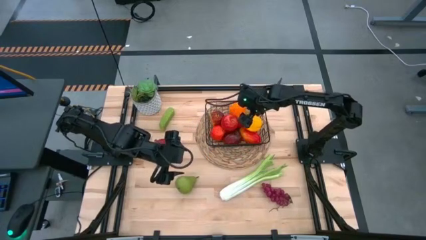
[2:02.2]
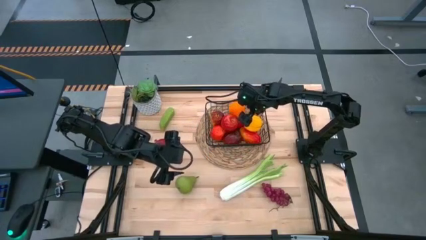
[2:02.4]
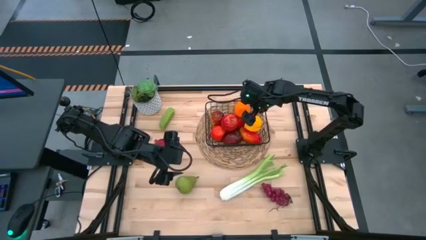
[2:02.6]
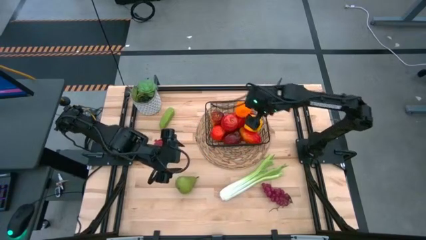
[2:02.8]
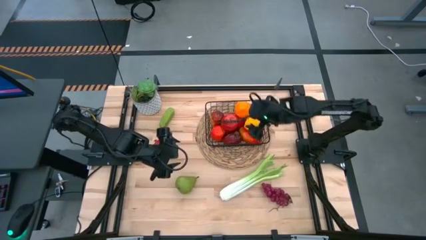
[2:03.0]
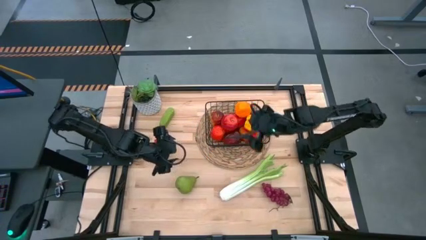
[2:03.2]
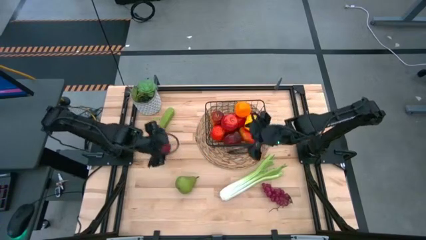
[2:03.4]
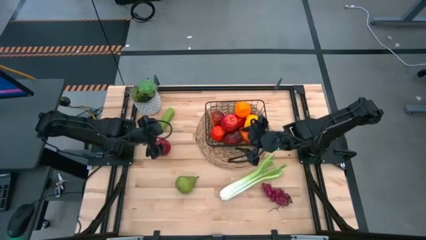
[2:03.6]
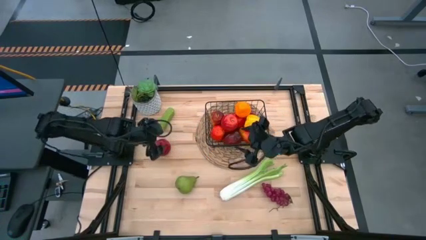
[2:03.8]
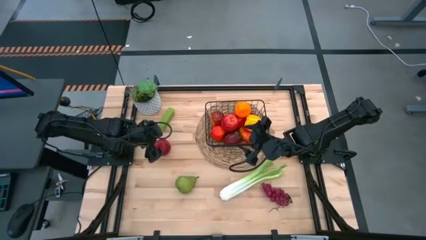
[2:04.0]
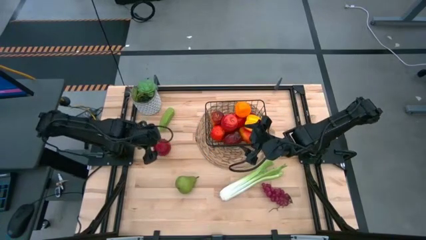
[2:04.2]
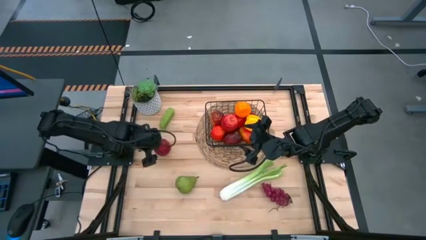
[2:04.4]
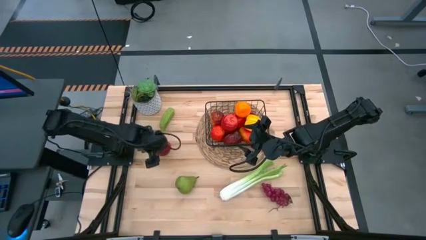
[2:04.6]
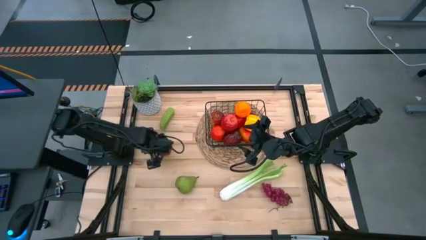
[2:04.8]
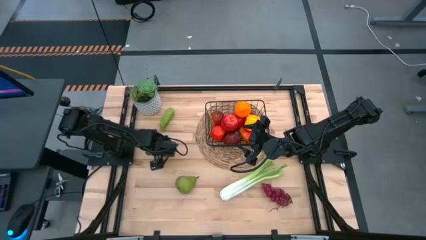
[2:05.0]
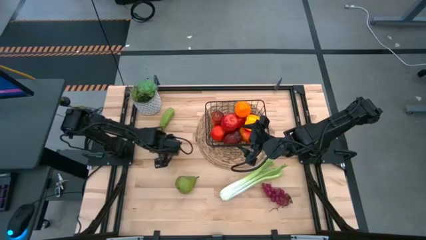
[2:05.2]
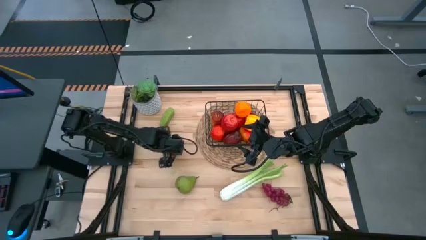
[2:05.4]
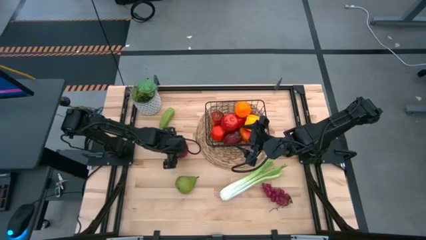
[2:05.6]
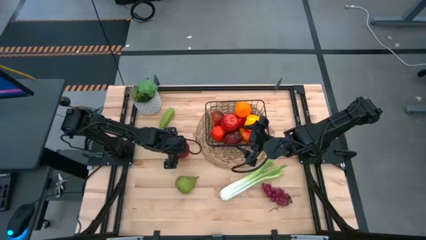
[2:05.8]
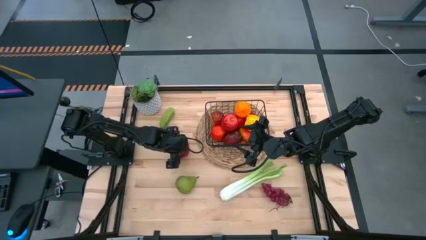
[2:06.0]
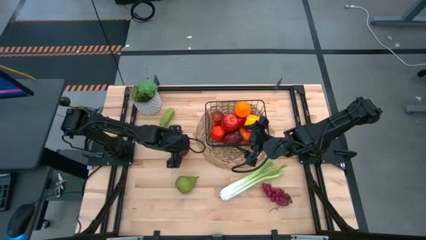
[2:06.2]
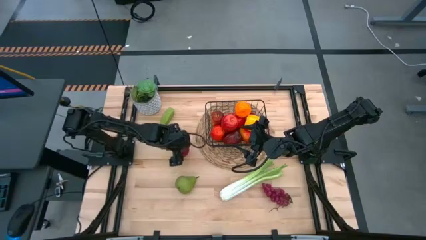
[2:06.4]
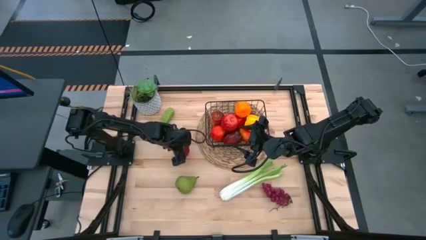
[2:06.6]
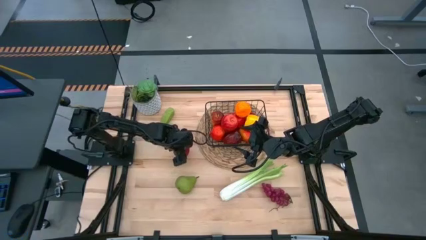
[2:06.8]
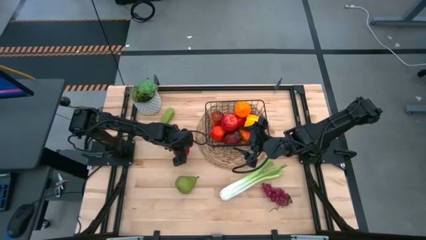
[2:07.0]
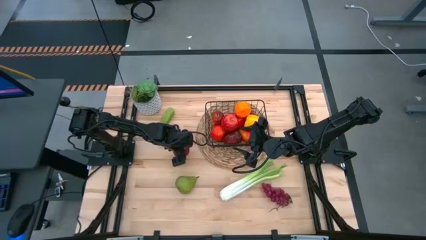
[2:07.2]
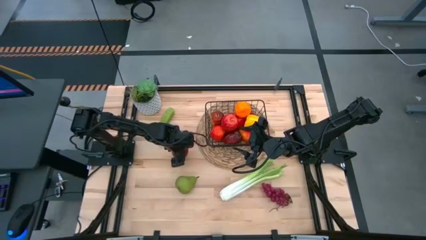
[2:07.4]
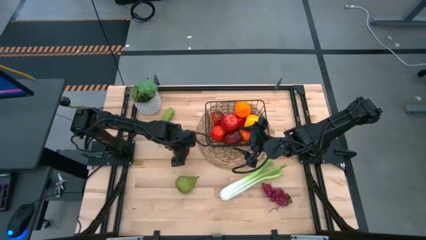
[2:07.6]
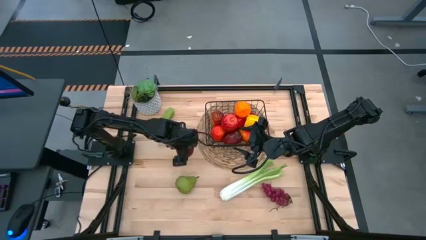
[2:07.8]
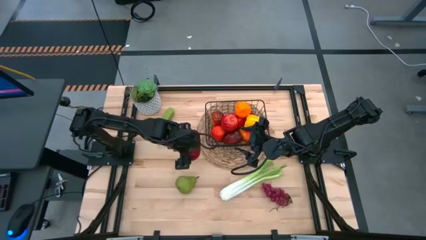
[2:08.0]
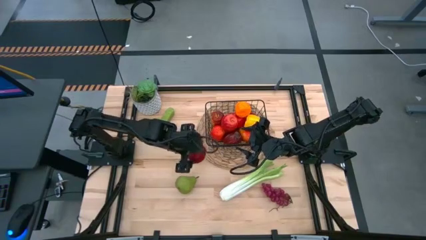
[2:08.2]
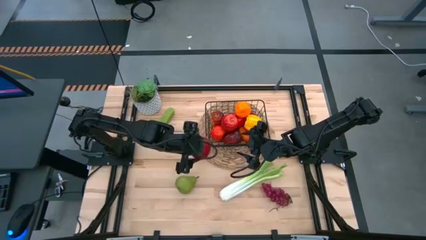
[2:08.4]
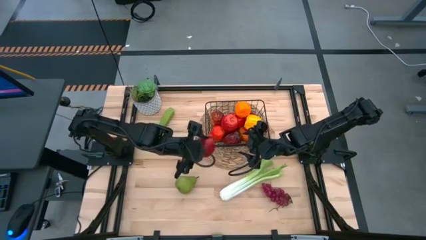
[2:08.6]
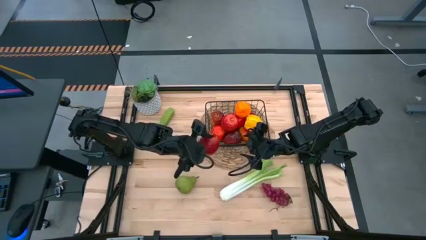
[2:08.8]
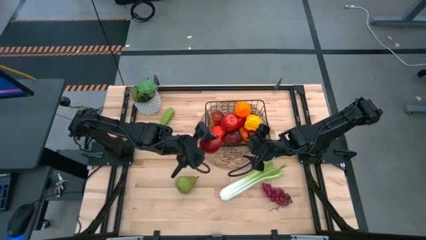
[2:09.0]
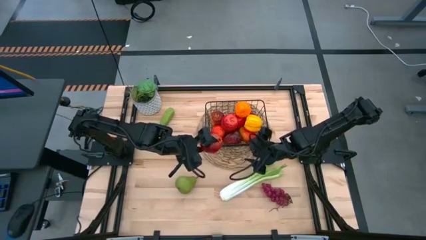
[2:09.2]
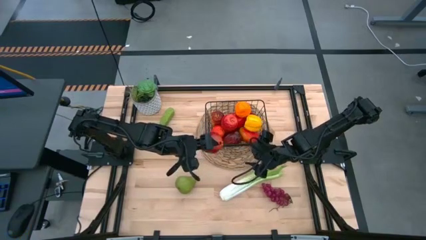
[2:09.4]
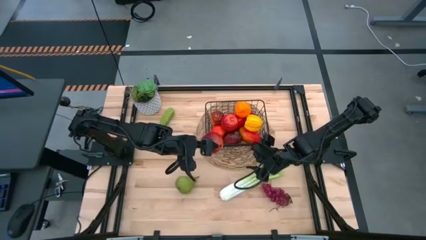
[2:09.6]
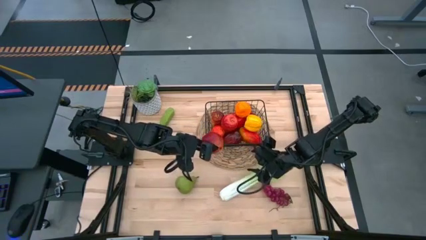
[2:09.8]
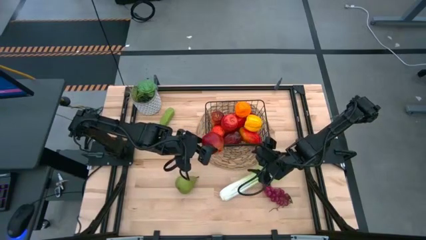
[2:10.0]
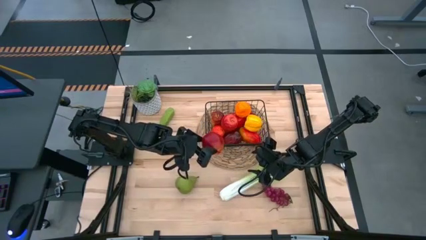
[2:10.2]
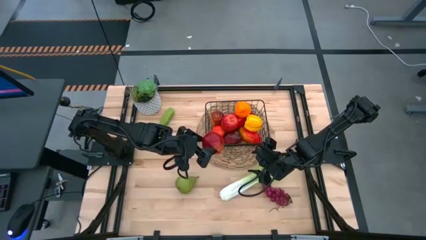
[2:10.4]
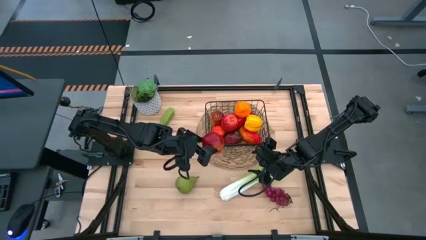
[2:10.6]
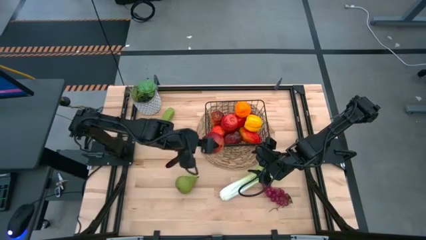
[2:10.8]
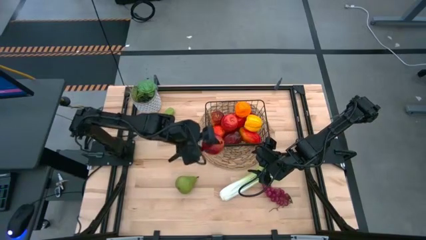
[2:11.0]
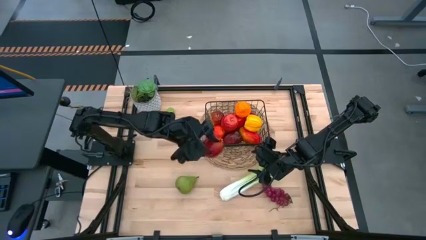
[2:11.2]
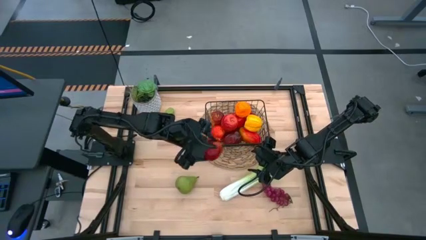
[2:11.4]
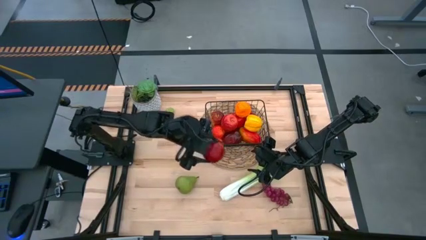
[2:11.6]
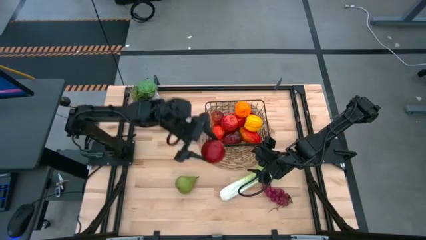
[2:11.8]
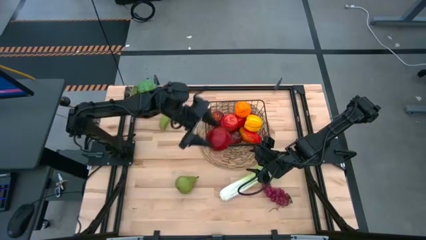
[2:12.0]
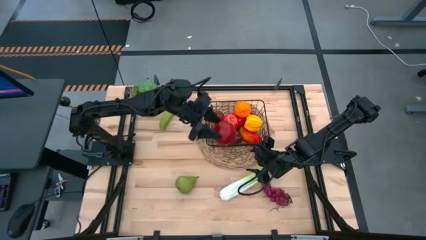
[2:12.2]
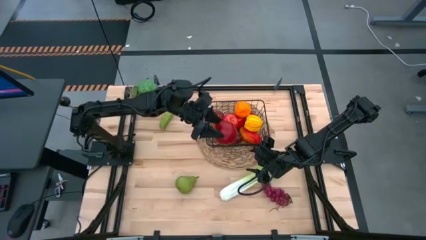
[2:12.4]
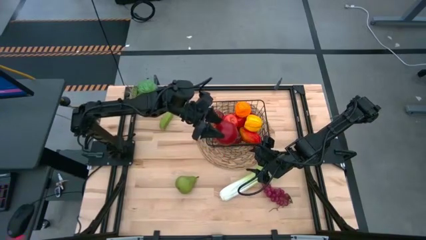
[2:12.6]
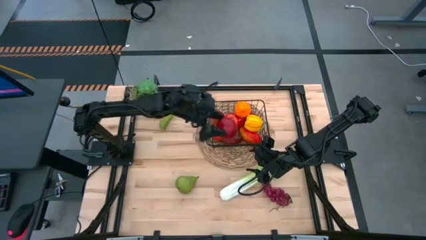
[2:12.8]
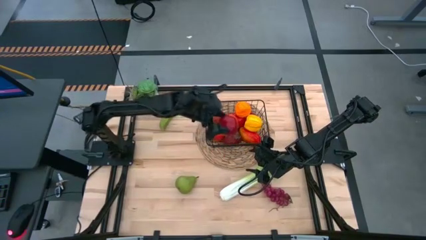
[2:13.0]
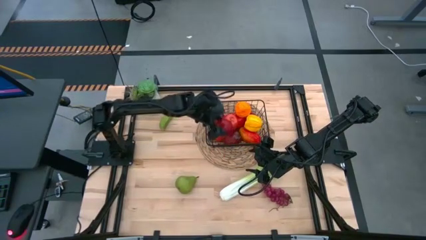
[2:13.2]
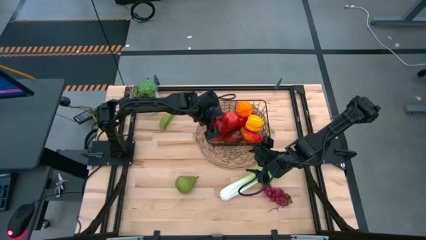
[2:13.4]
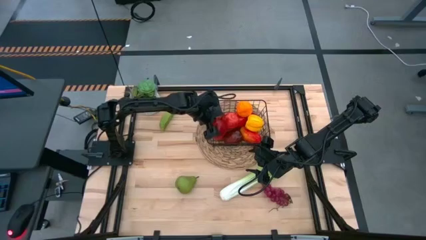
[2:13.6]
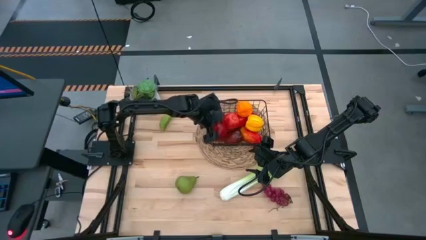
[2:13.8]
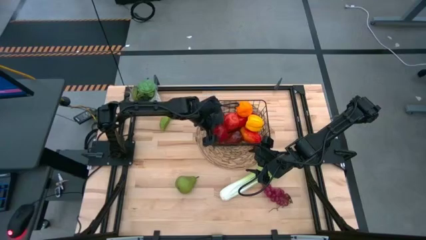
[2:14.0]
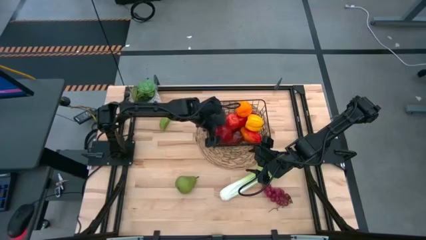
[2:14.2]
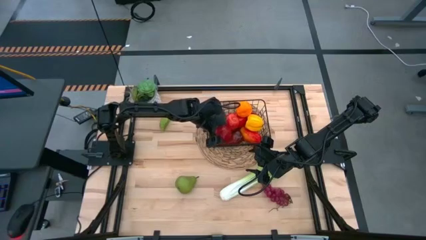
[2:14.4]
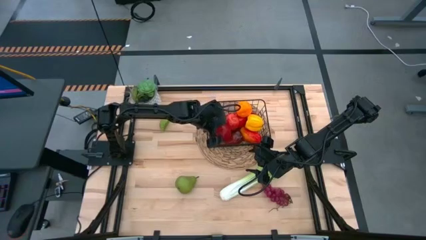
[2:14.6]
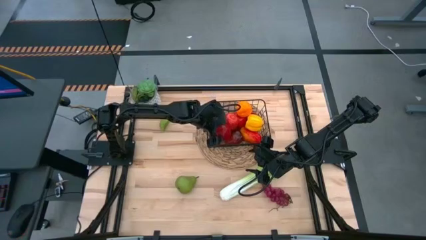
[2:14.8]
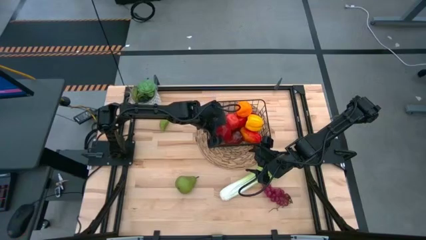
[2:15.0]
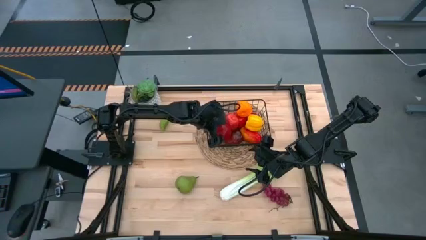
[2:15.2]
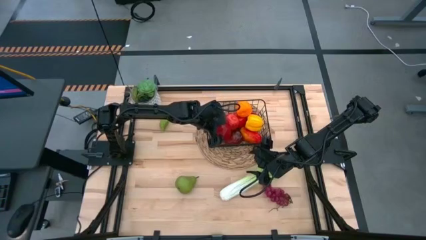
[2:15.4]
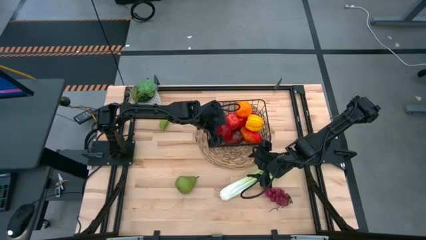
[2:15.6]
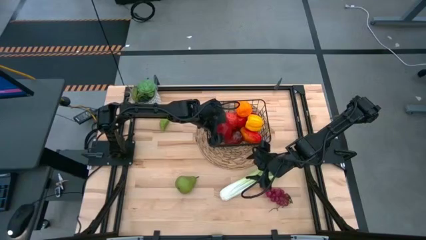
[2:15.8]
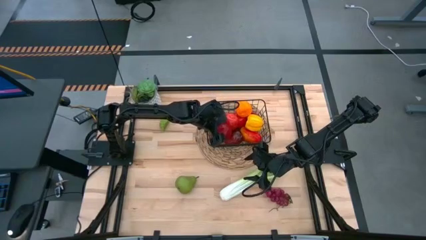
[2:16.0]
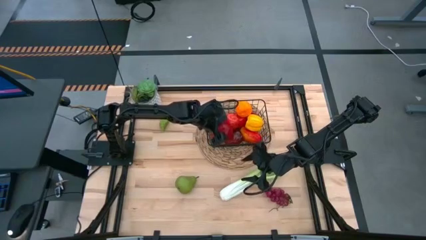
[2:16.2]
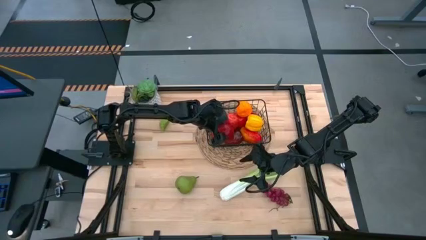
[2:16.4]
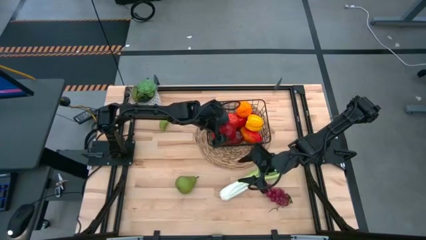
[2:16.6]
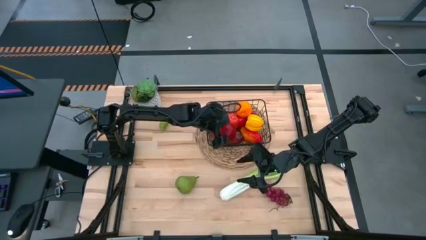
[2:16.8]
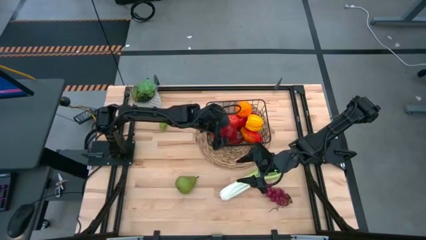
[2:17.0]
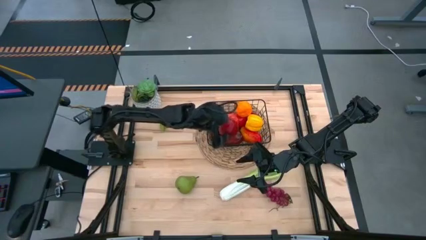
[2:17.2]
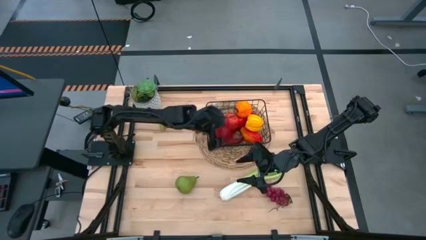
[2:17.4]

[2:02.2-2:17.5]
Task: Build produce basket
Put the red pomegranate into the black wire basket

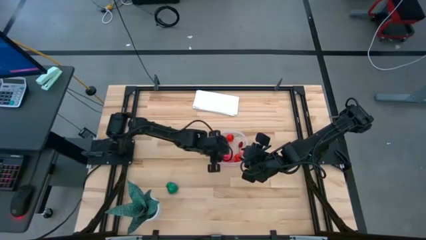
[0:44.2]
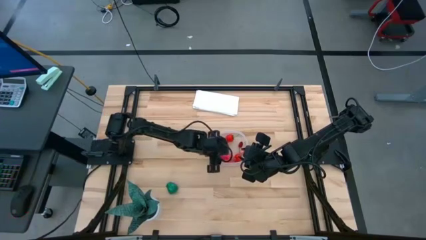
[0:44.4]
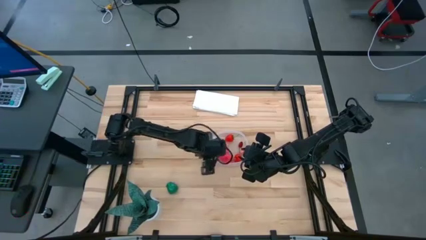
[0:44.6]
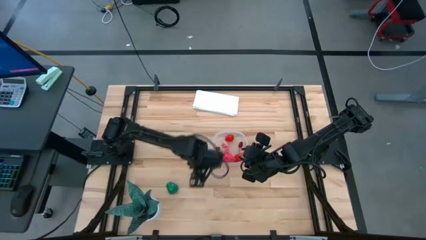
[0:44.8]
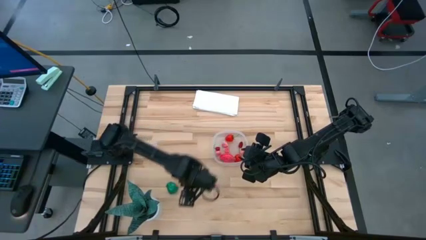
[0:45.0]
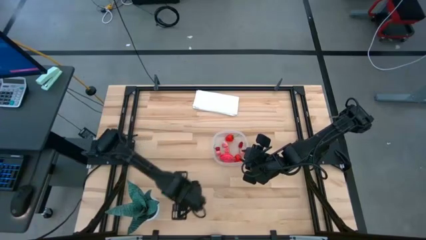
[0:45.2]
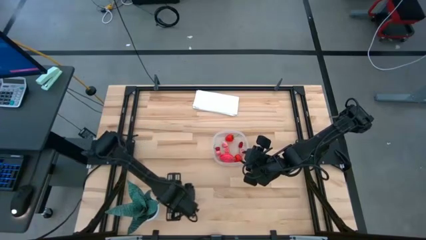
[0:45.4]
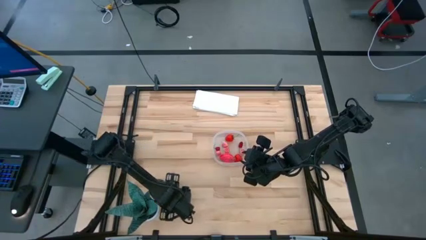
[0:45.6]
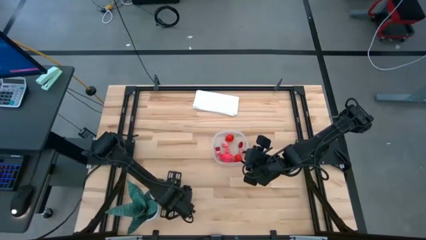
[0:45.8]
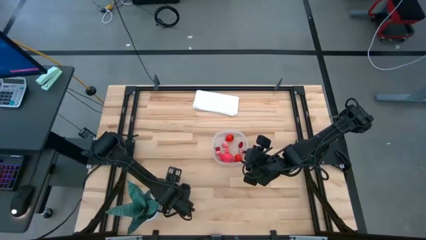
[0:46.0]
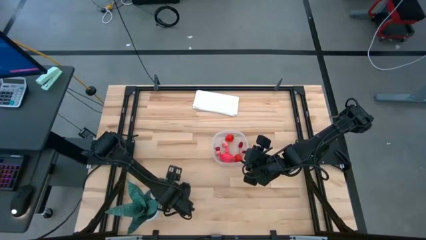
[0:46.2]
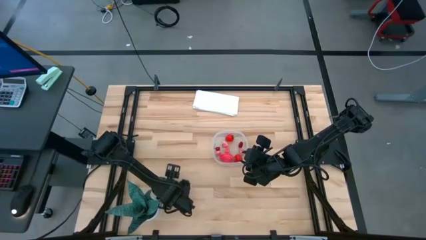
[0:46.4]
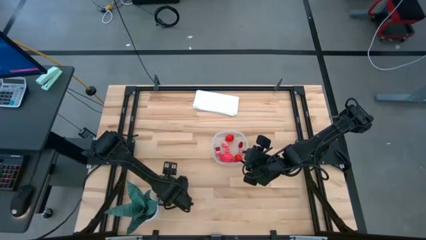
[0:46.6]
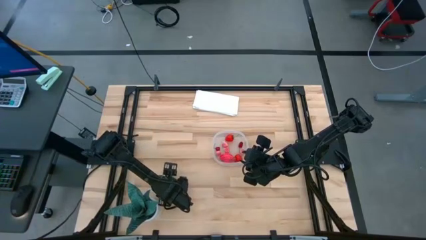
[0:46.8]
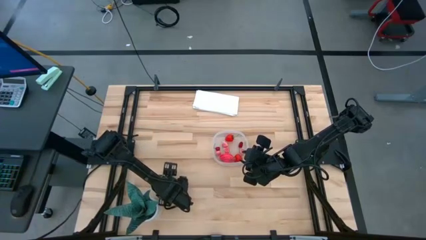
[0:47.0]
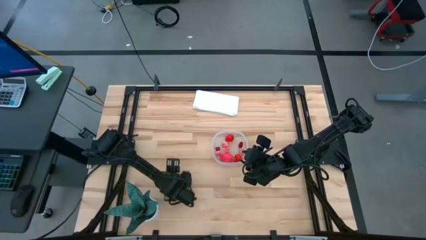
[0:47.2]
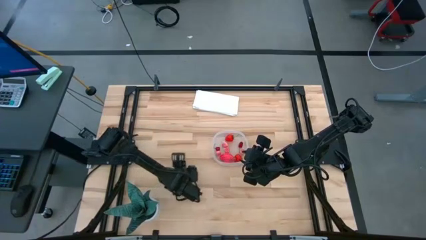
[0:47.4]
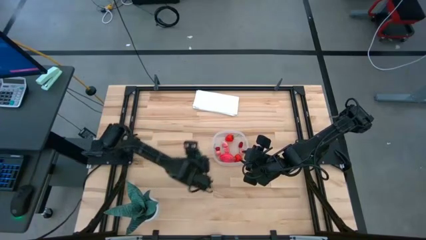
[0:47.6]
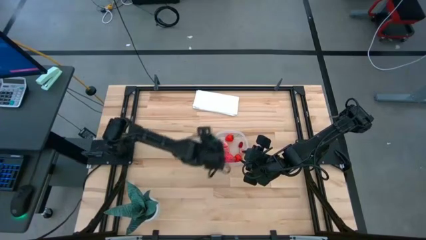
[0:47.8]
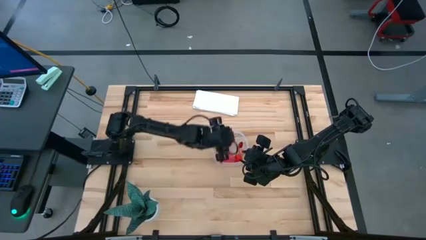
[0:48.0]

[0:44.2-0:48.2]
Task: Pick and placing Produce into tupperware
Put the green bell pepper into the transparent bin
